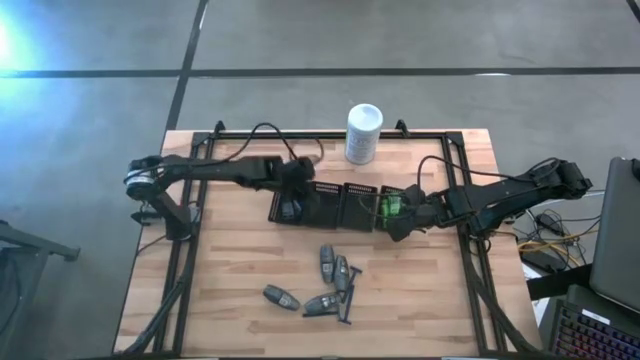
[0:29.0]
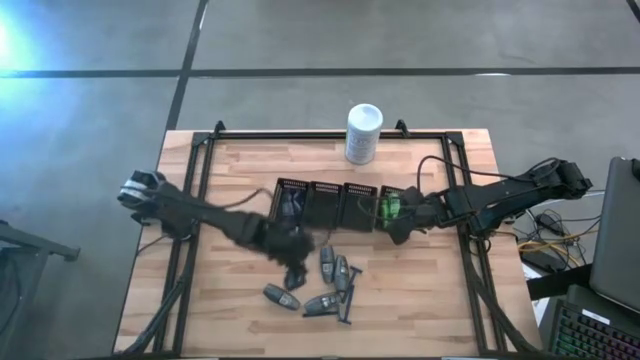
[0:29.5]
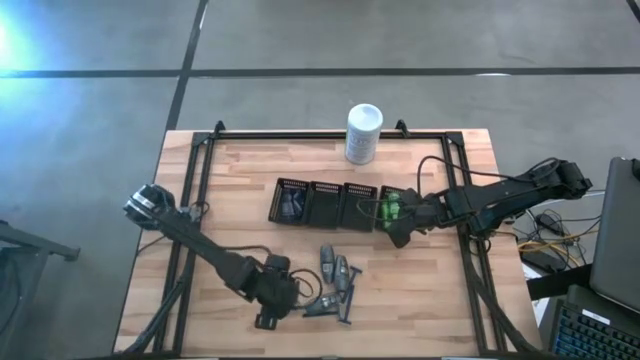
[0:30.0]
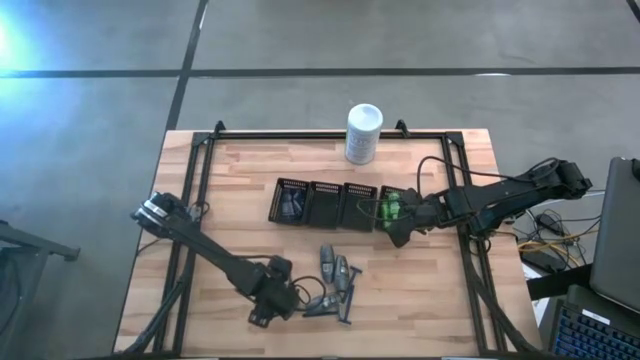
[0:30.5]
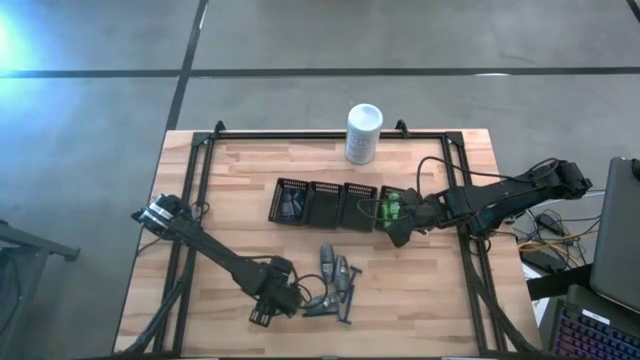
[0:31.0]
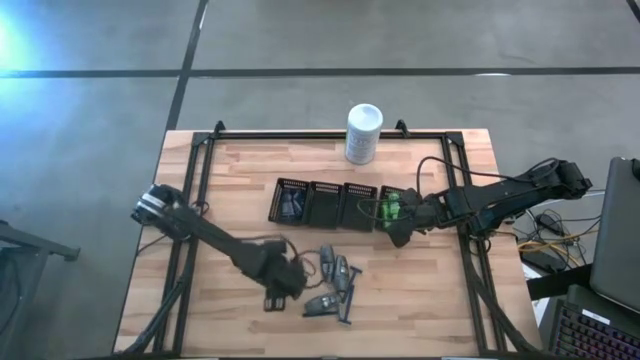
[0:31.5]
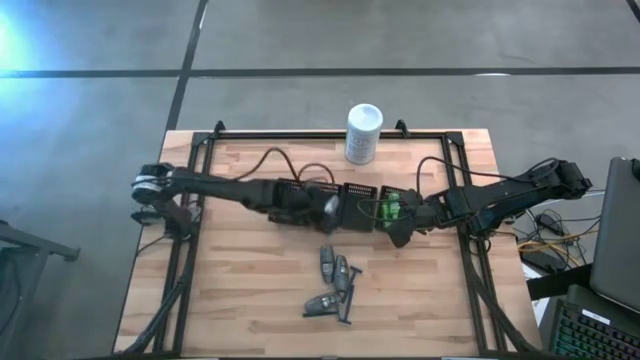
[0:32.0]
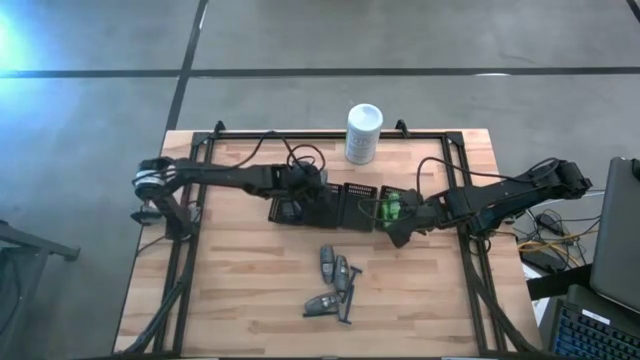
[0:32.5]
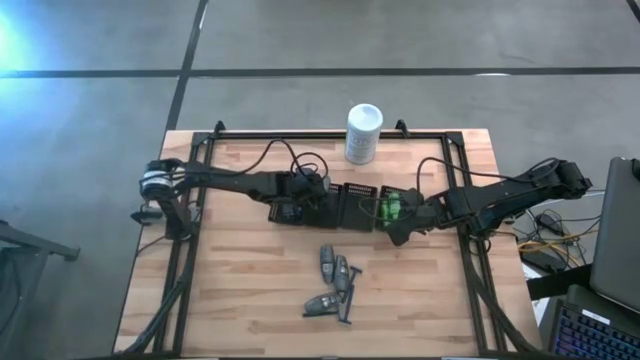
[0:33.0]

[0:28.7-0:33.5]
Task: Pick & Place Travel size toiletries
Put the gray deodorant into the middle left black bin

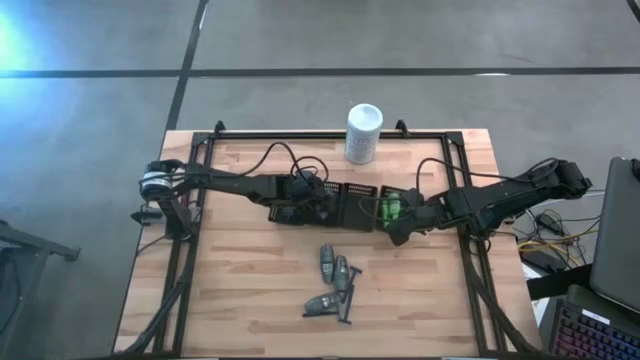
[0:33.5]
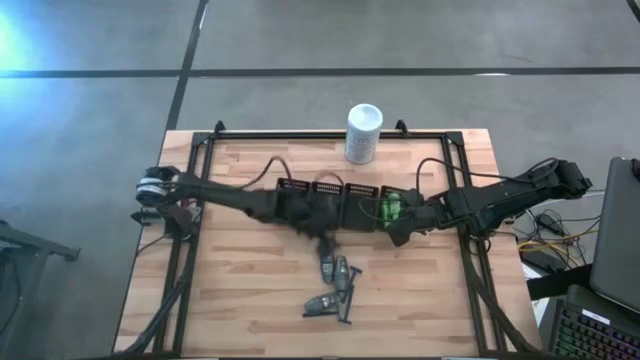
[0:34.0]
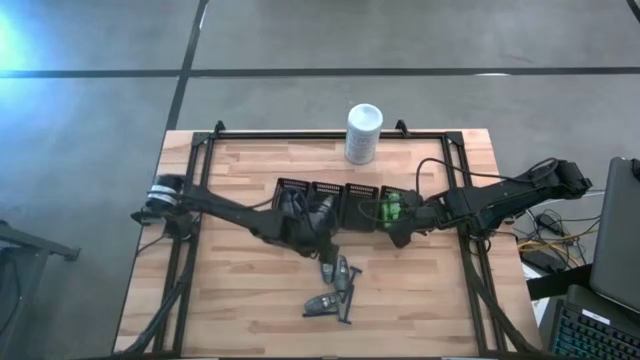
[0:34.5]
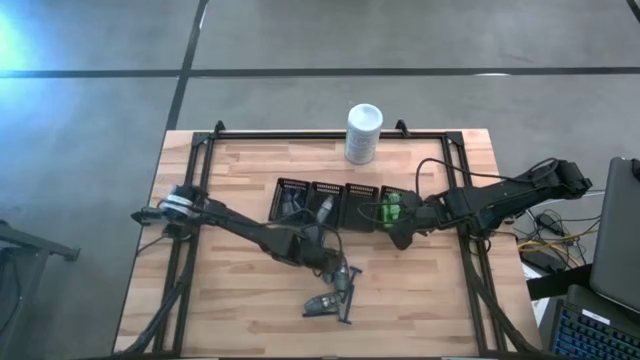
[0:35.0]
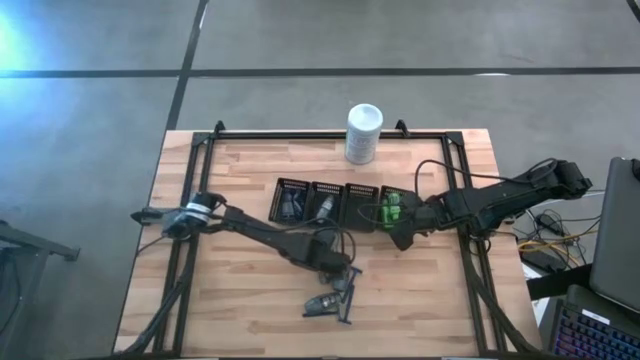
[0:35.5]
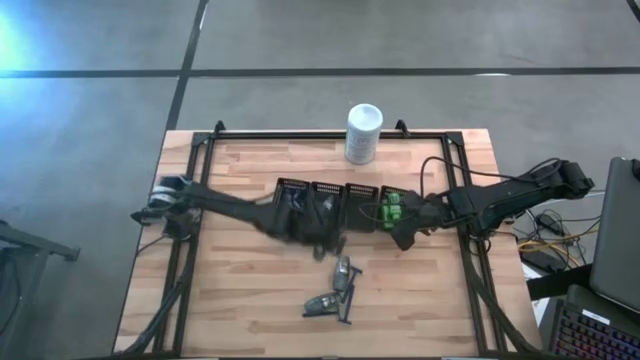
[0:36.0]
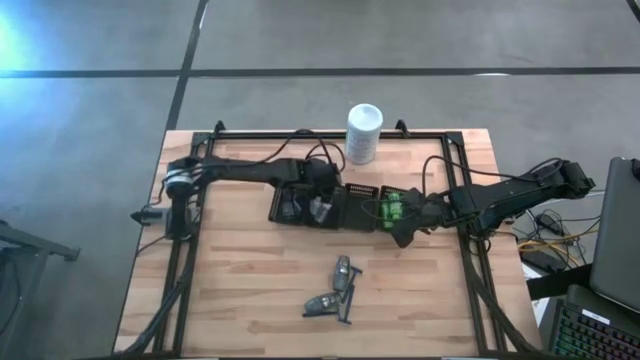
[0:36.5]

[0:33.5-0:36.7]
Put the gray deodorant into the middle left black bin

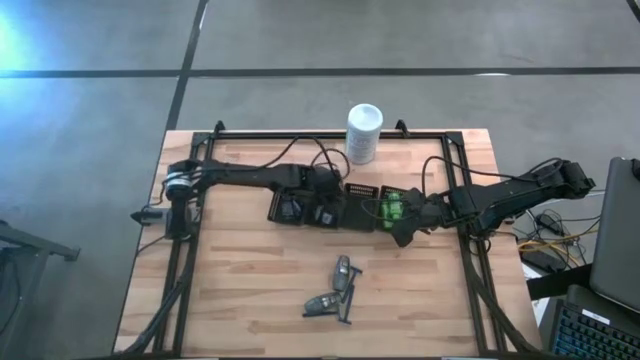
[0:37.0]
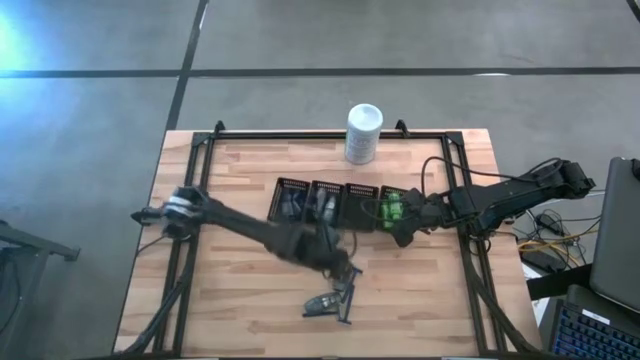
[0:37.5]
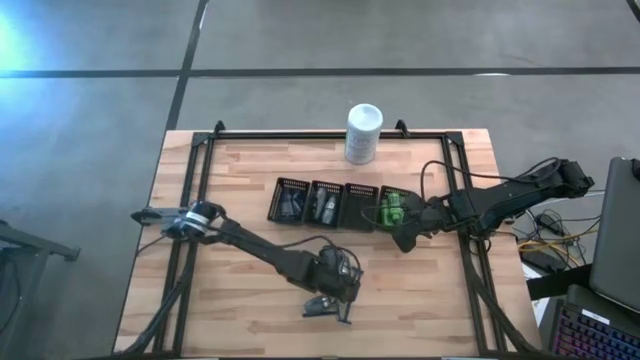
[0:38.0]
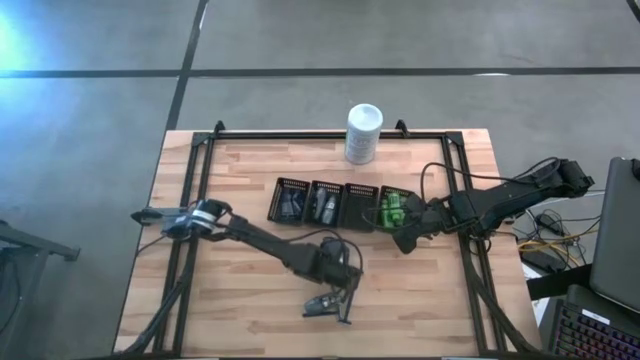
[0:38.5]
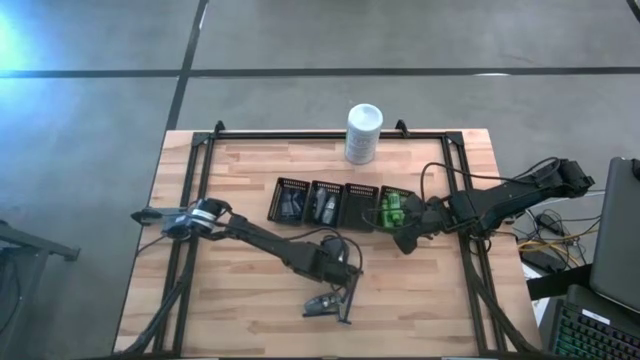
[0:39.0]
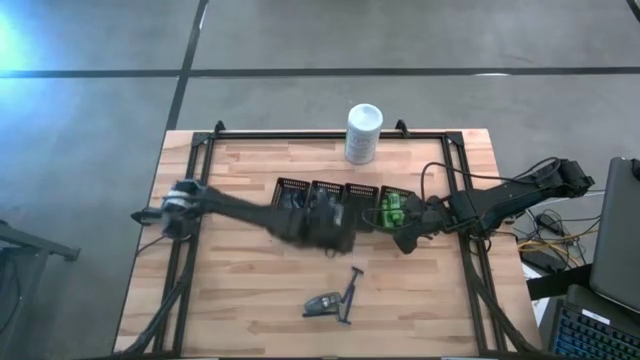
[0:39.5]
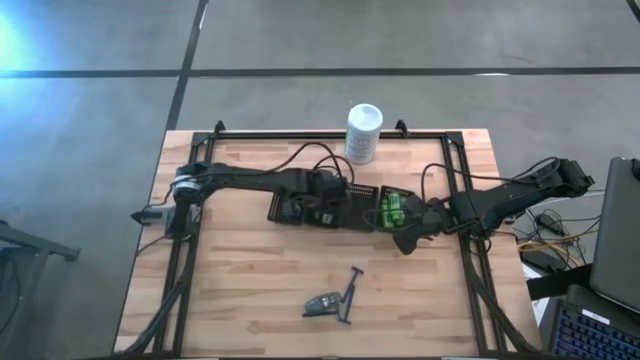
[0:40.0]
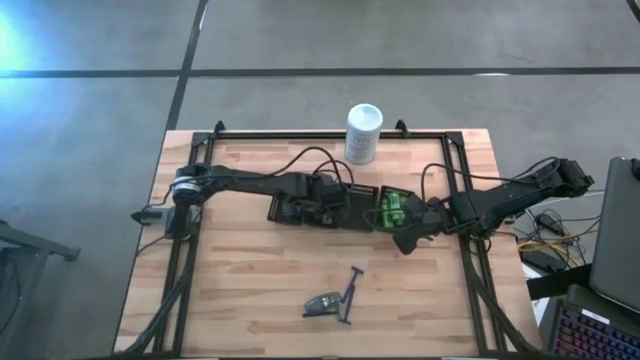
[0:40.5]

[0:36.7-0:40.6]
Put the gray deodorant into the middle left black bin

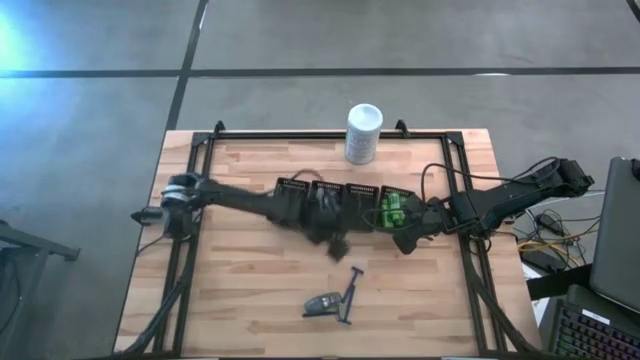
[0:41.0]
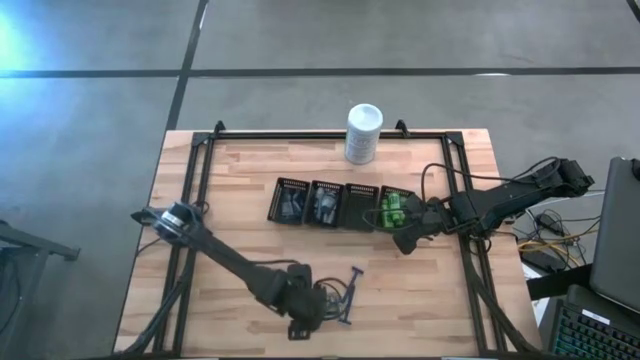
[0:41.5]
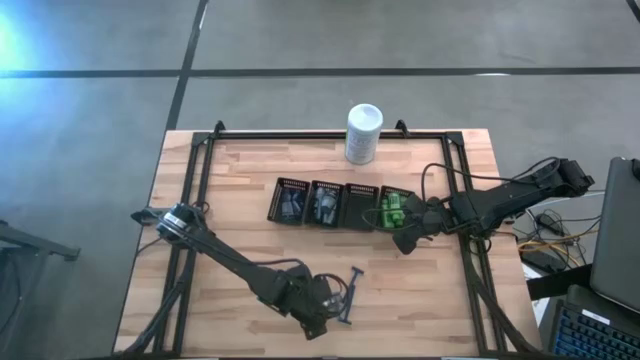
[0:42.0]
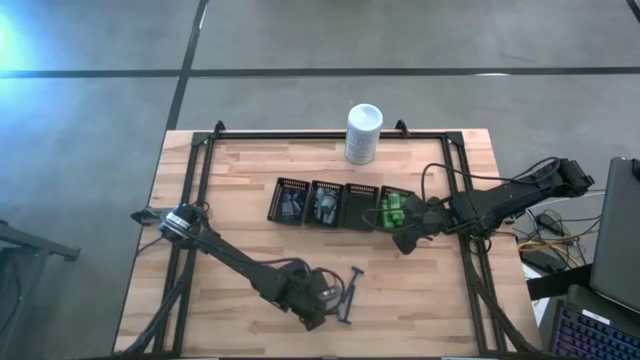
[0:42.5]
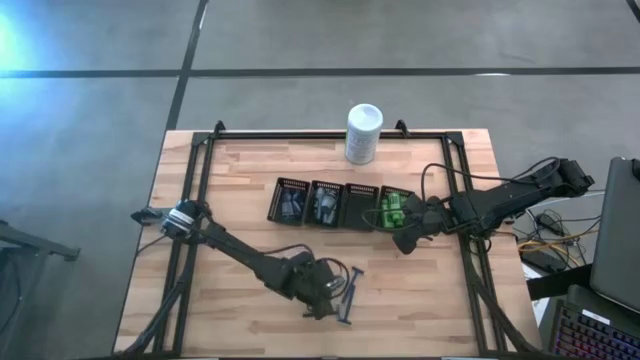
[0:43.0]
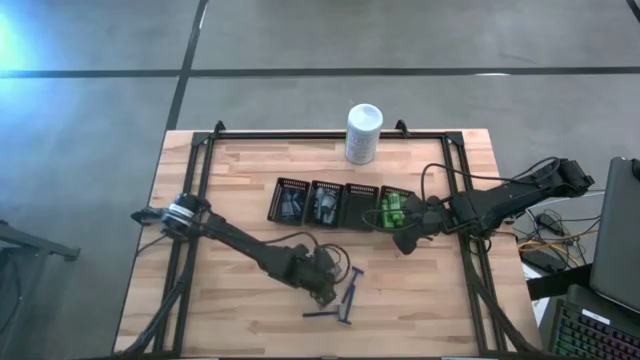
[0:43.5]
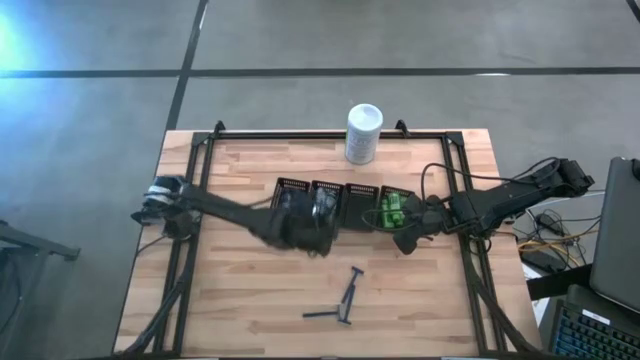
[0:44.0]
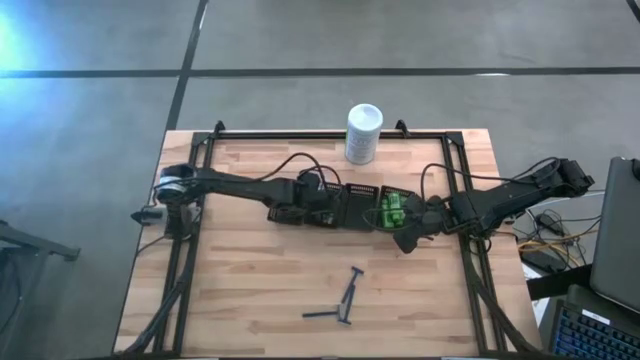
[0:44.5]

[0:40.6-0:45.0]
Put the gray deodorant into the middle left black bin

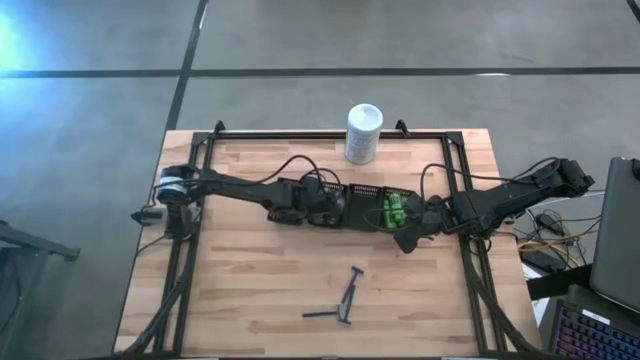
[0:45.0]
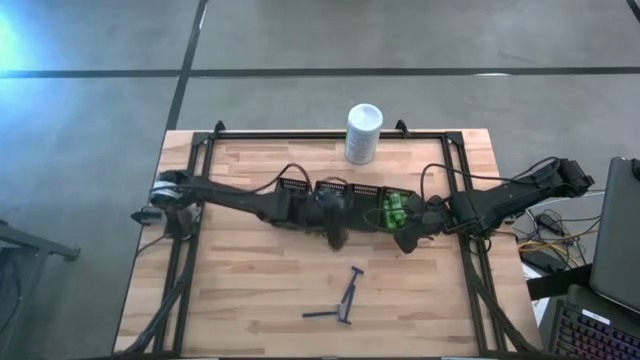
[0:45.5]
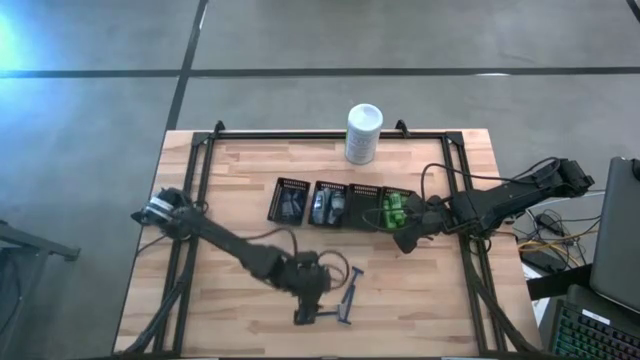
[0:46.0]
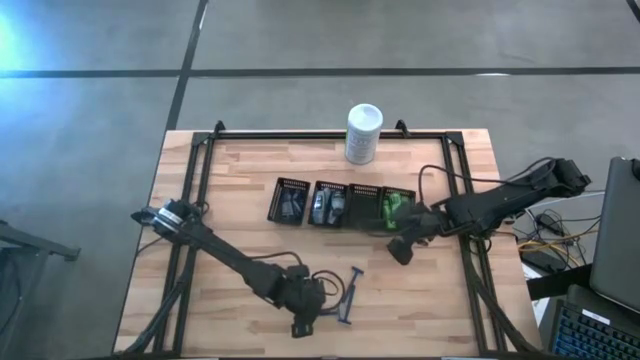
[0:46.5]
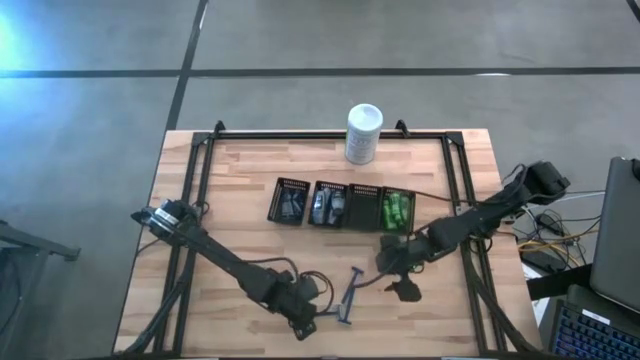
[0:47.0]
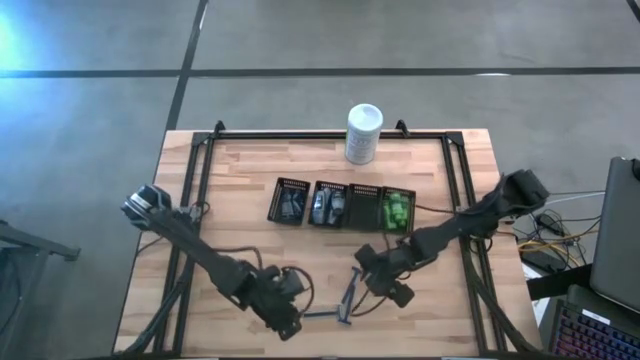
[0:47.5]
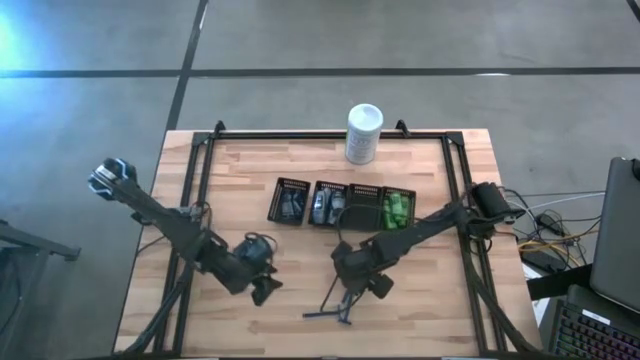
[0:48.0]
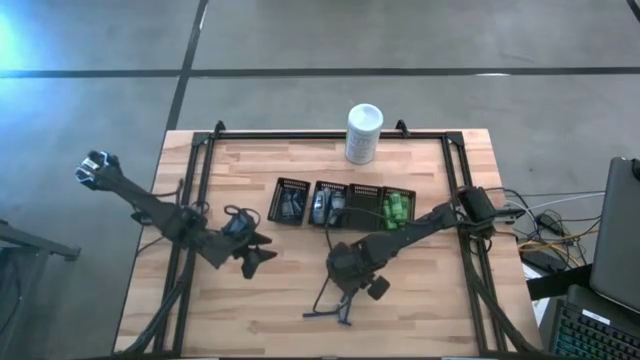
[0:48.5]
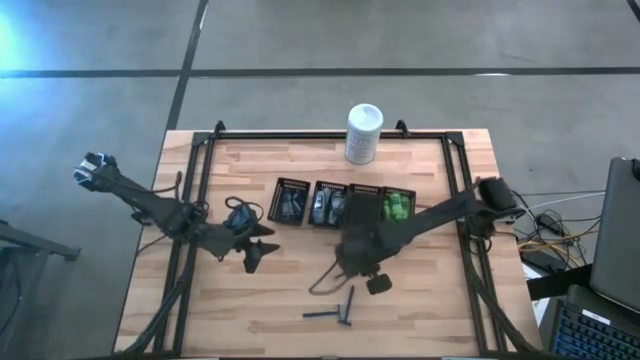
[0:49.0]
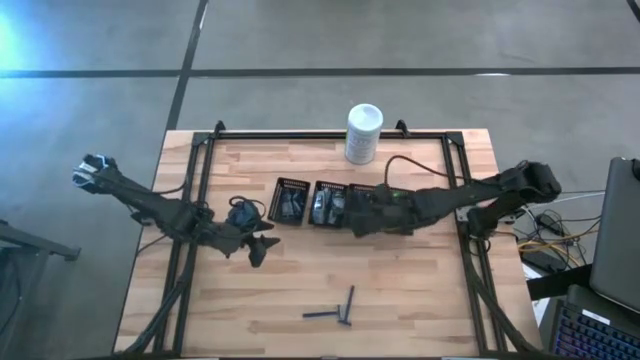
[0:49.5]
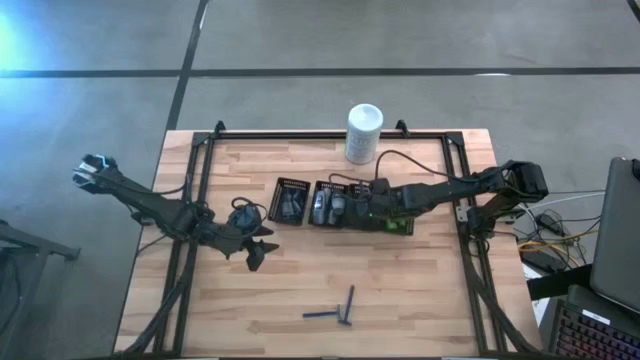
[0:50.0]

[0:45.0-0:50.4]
Put the blue razor into the middle right black bin
